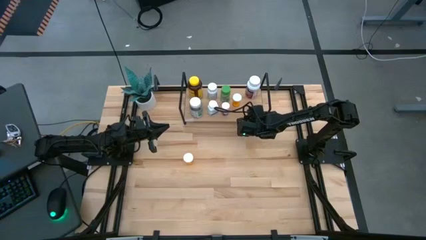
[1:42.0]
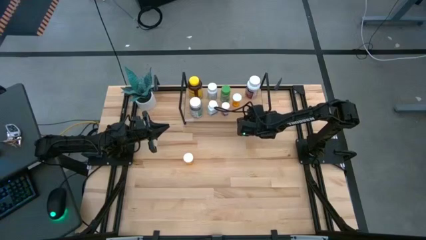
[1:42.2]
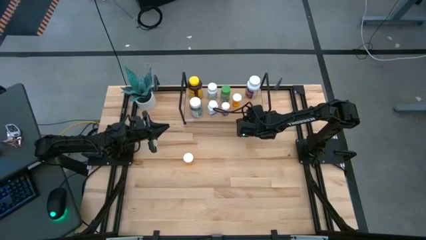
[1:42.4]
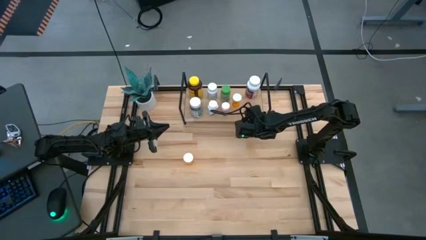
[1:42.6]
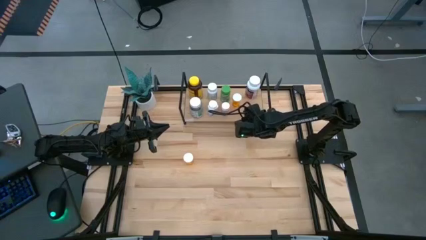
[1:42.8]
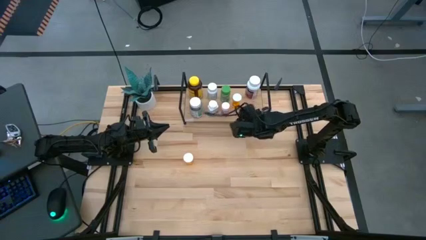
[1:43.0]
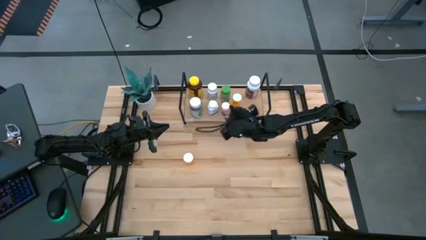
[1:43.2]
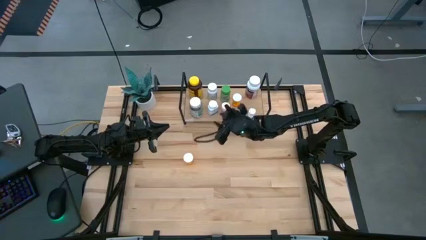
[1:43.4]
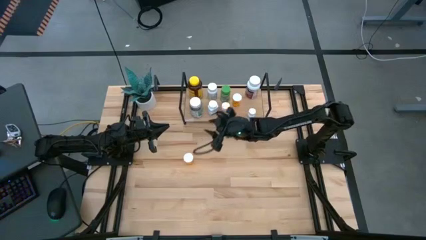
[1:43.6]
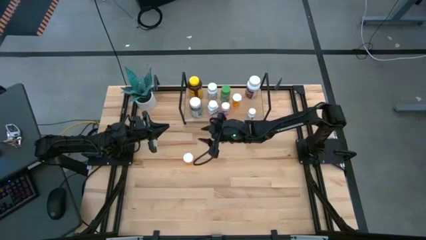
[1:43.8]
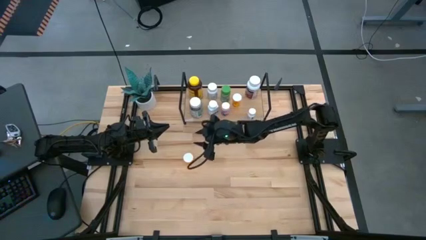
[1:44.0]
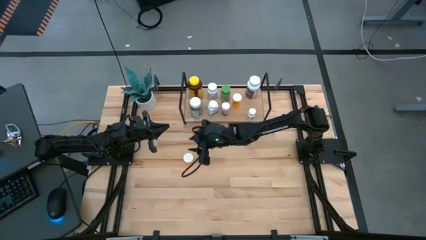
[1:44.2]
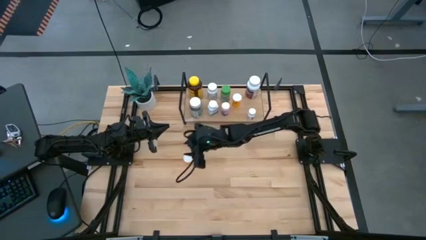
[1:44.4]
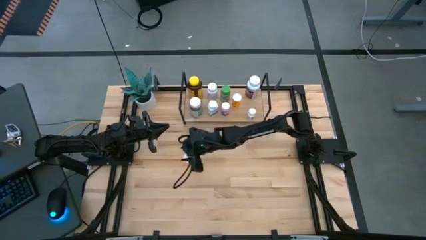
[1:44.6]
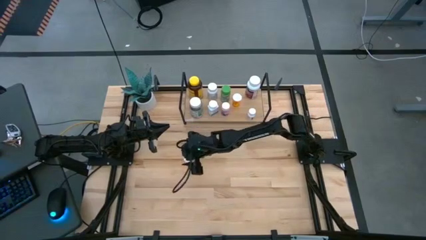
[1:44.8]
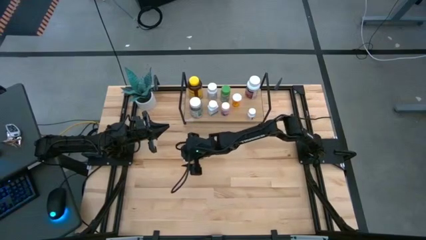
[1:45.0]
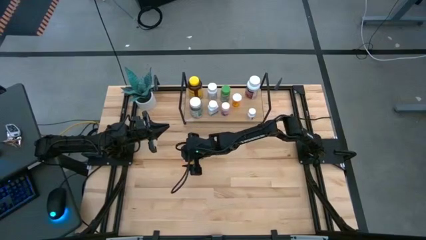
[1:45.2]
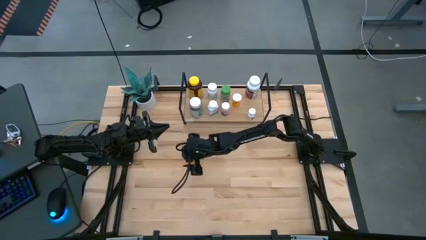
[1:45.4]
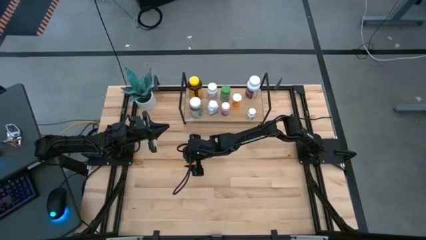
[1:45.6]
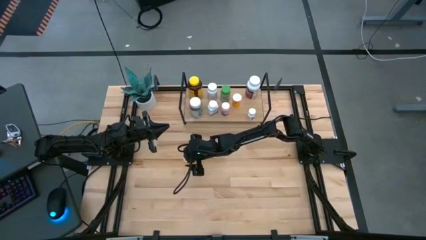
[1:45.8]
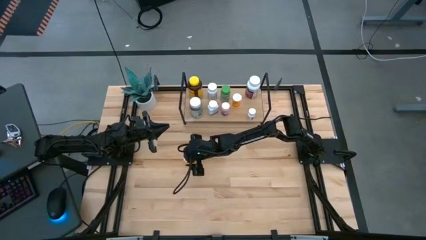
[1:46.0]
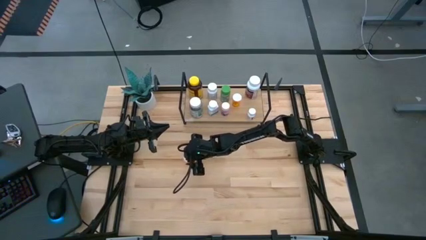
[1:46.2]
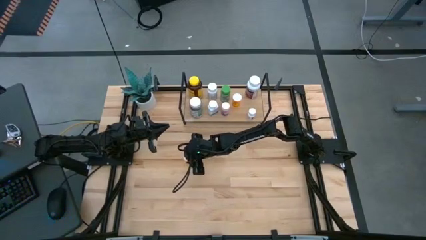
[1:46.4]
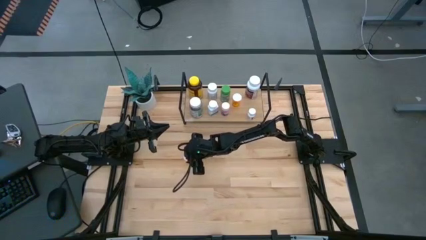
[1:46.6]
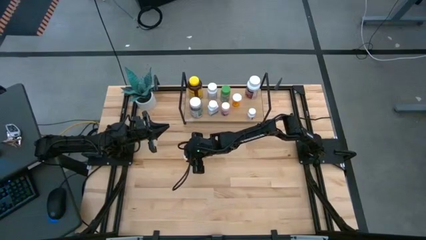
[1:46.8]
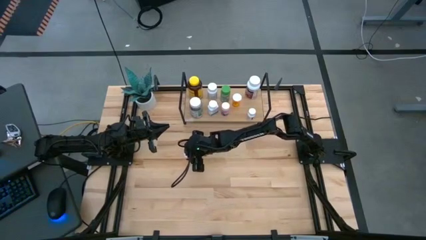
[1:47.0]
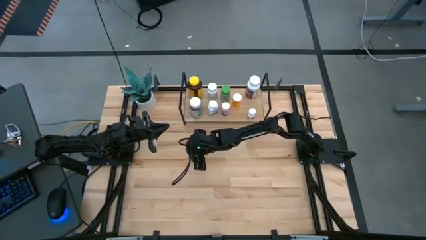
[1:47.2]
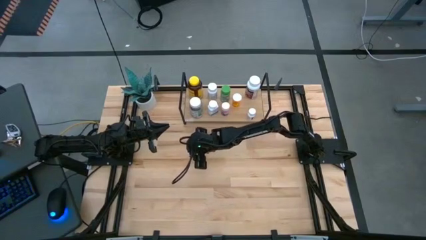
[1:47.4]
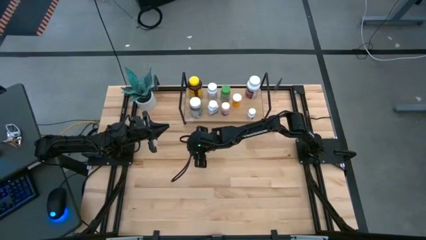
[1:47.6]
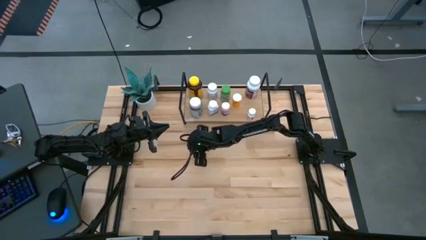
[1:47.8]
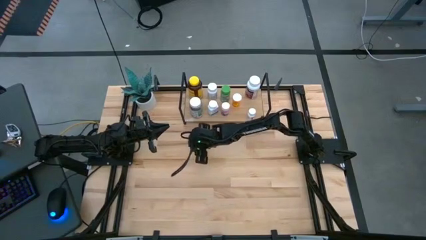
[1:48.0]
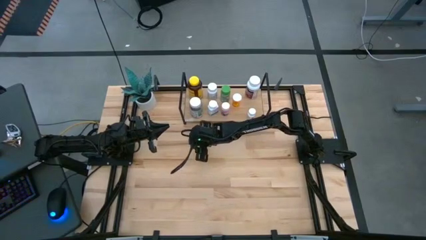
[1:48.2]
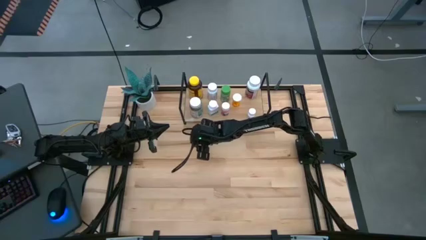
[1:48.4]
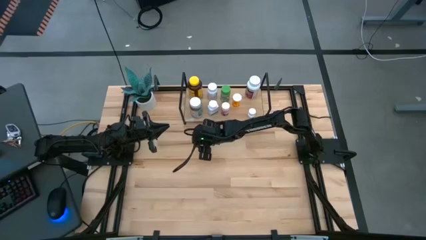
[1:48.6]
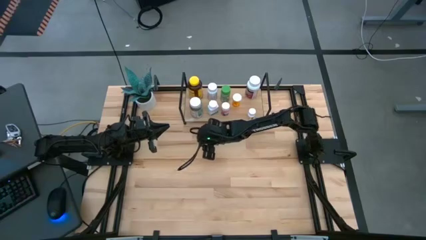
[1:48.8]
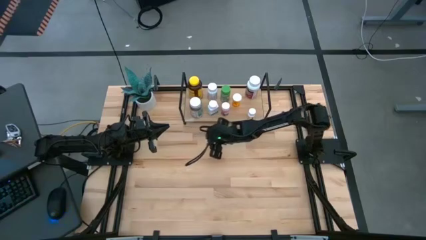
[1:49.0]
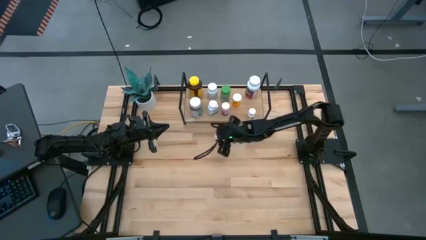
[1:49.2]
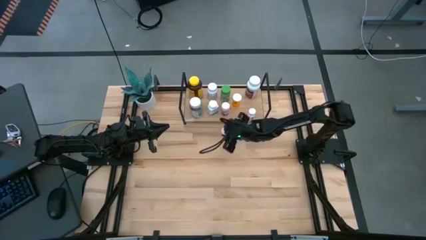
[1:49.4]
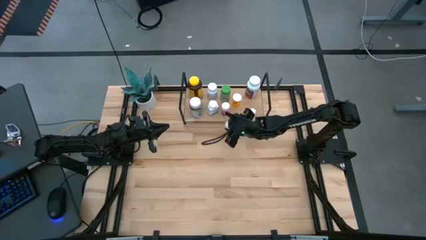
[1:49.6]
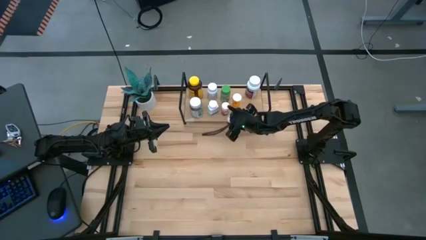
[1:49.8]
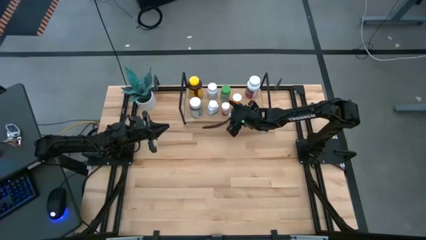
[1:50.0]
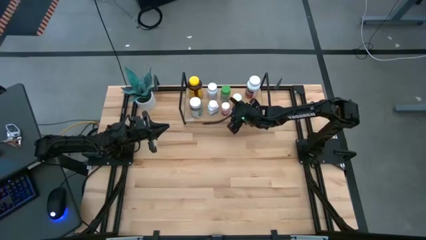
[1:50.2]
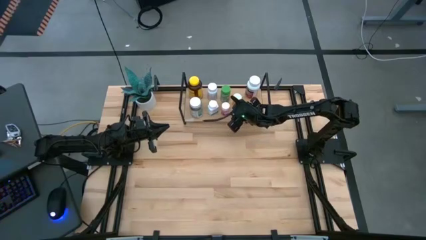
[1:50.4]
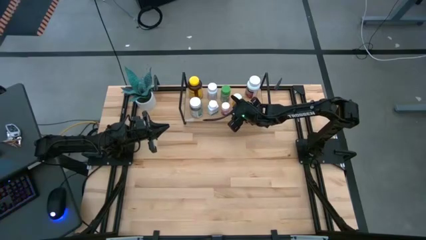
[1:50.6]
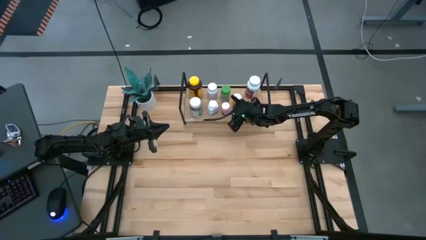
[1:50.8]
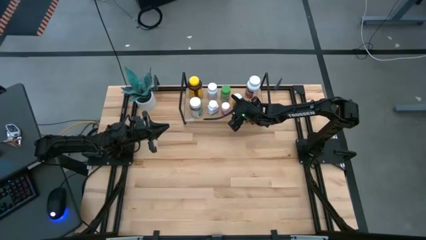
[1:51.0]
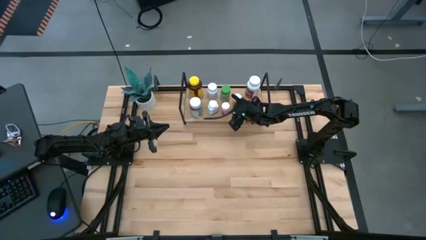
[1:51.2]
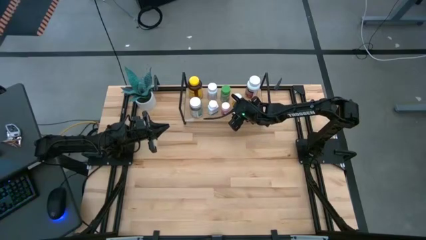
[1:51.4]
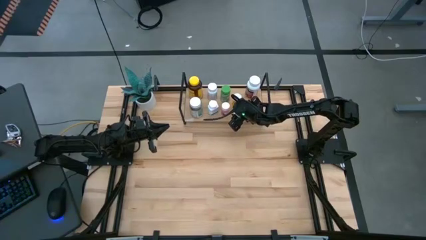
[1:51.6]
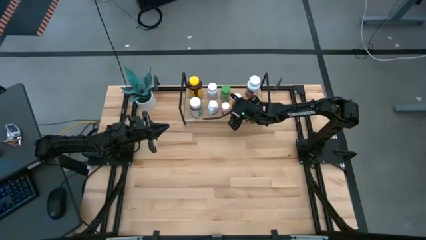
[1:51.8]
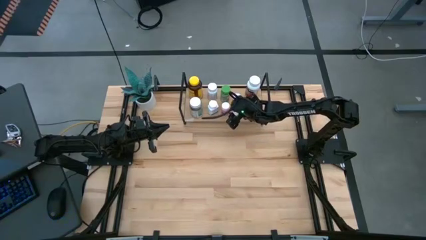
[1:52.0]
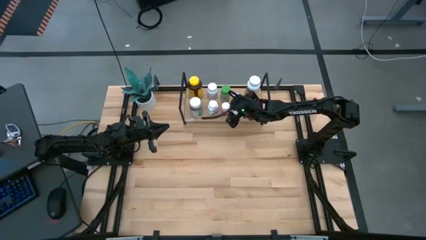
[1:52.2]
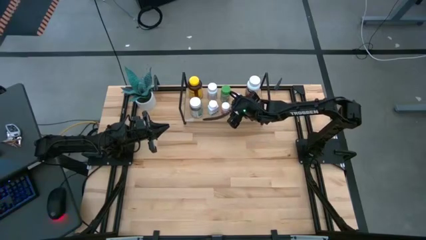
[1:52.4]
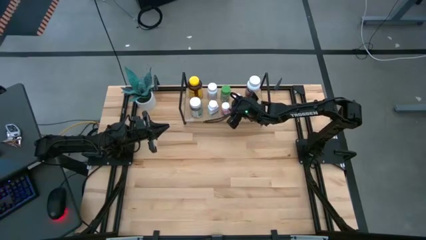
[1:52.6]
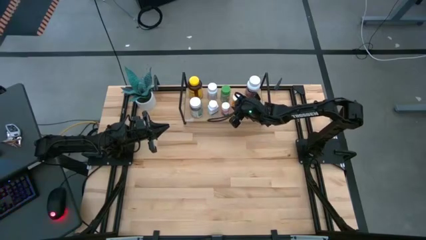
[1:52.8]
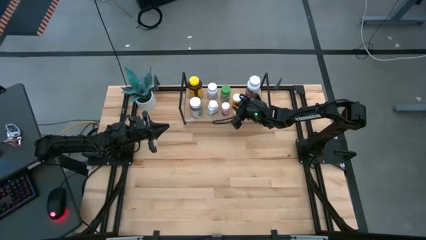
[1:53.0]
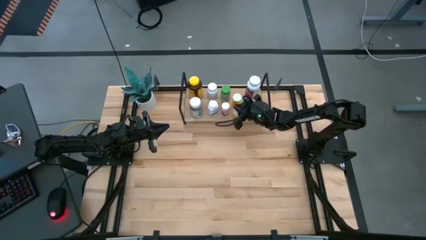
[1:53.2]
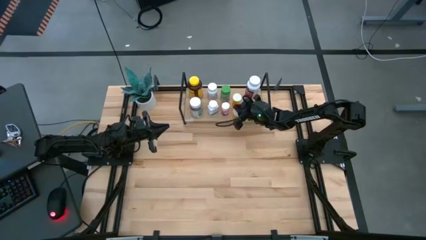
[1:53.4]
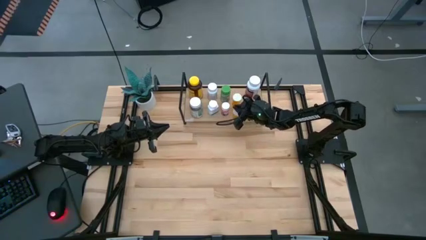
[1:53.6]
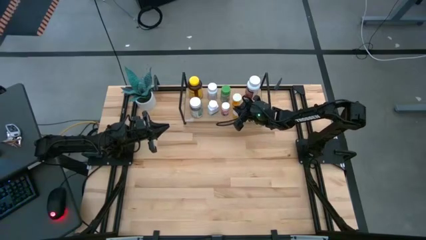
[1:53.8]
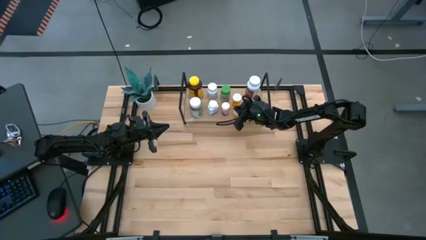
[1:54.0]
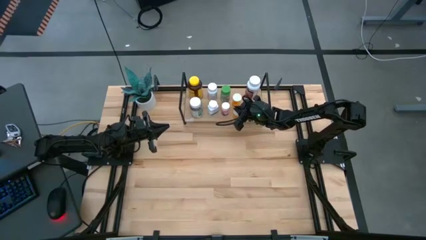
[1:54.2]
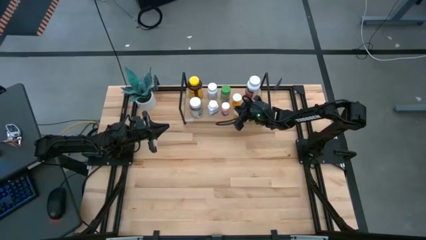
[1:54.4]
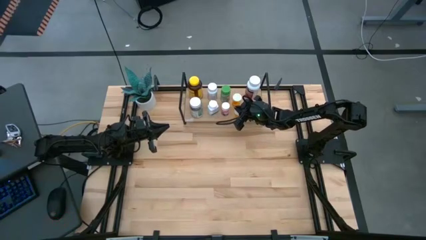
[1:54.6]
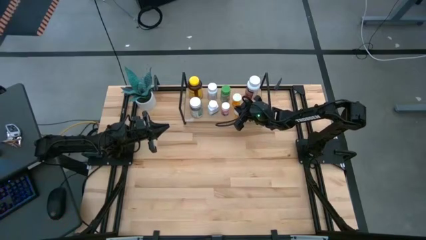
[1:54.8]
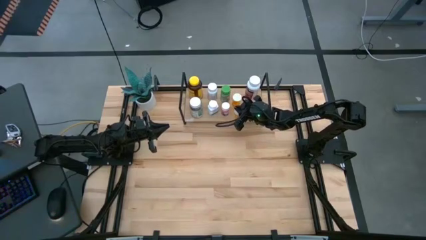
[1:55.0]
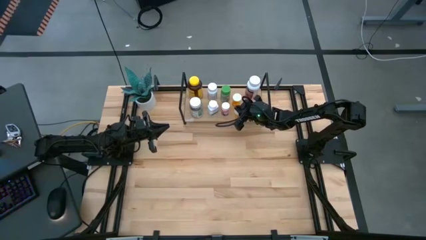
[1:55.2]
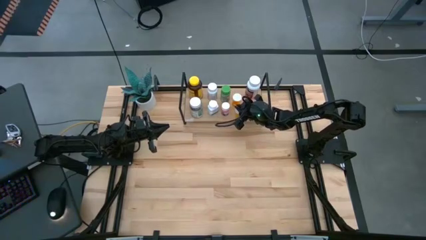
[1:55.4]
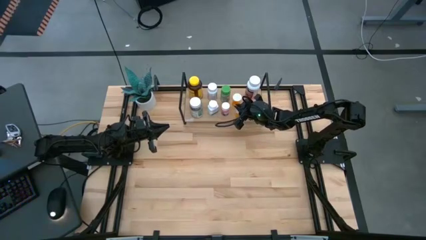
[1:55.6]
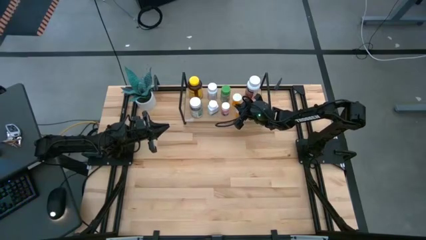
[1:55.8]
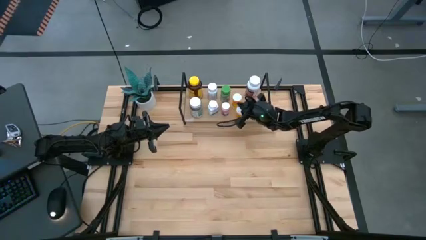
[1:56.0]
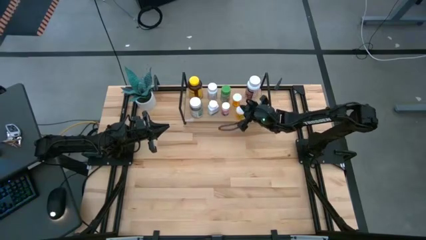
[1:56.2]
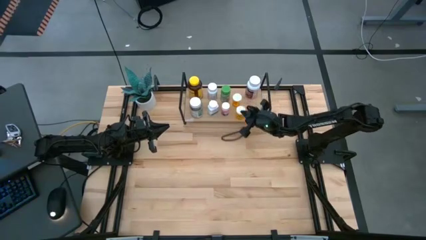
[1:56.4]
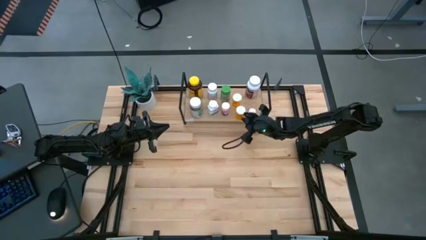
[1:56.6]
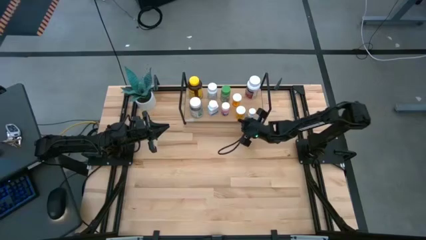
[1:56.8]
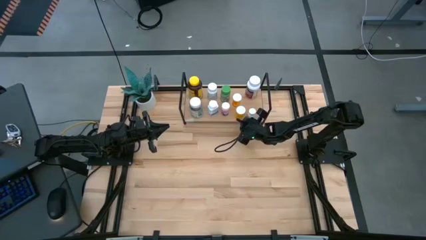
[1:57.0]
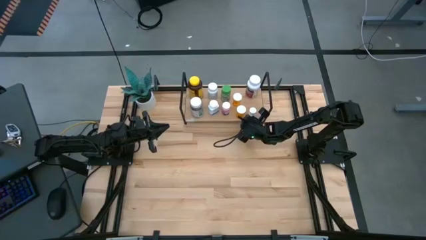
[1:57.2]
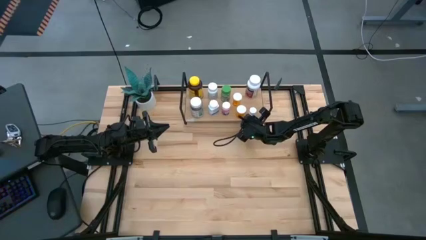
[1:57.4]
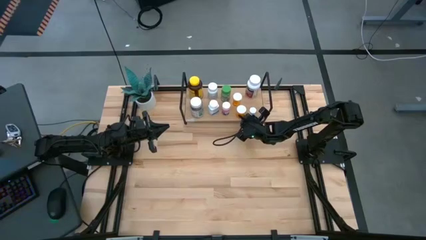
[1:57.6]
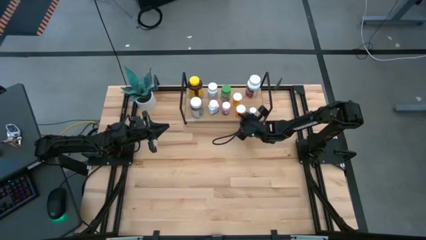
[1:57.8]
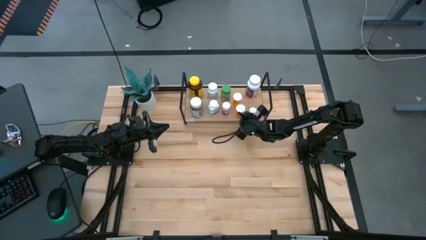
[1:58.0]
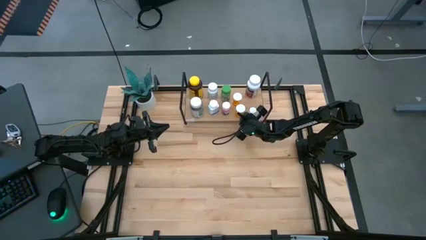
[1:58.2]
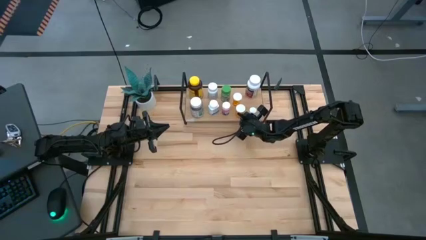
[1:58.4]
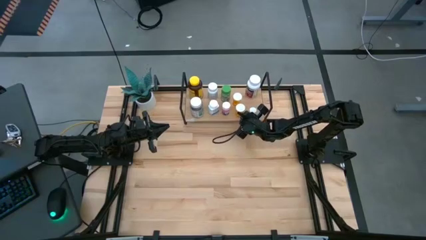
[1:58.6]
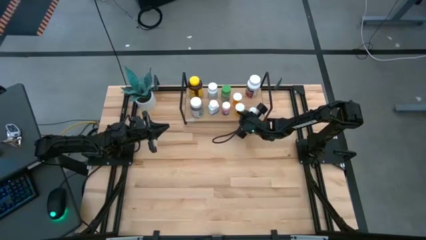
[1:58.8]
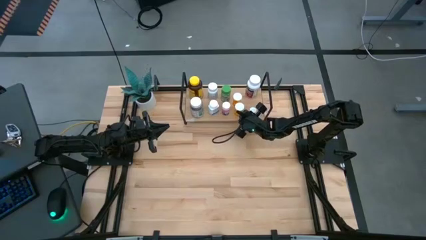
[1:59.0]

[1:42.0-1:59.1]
Task: Pick and place medicine bottles onto shelf by color
Put the orange pill bottle on the shelf

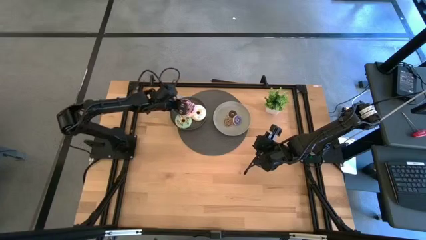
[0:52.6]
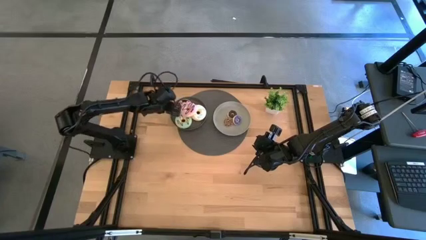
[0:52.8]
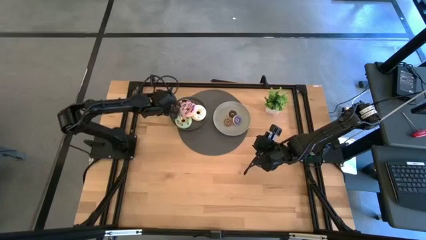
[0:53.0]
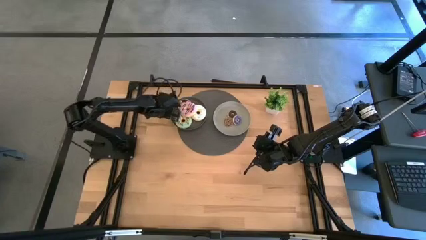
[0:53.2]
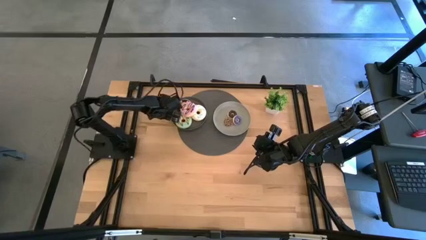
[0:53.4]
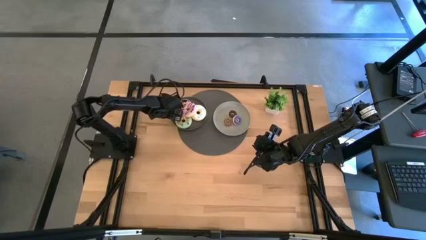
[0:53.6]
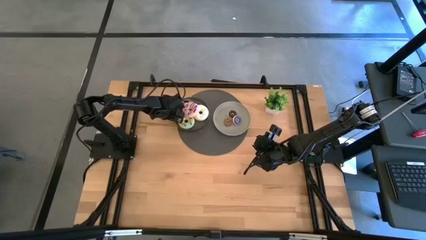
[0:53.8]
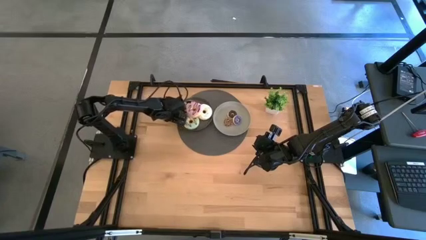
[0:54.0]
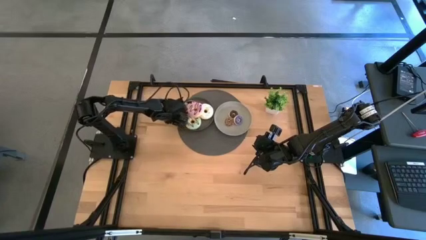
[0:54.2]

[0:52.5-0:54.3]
Task: Pick & Place donuts
Adjust the dark gray plate
